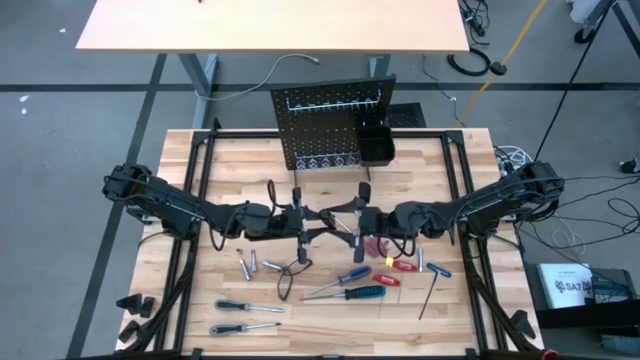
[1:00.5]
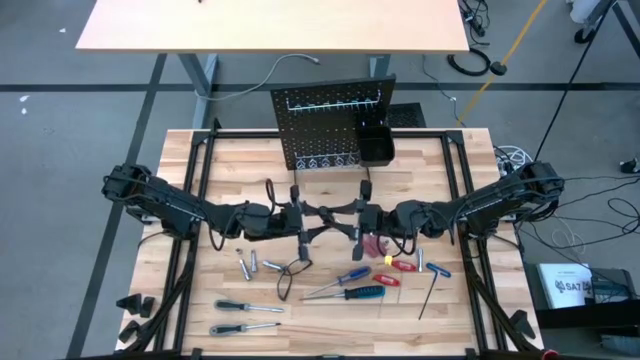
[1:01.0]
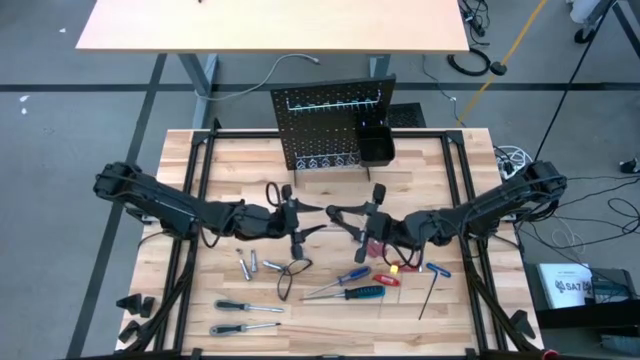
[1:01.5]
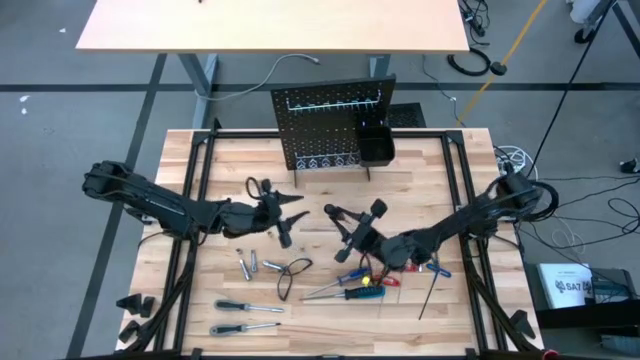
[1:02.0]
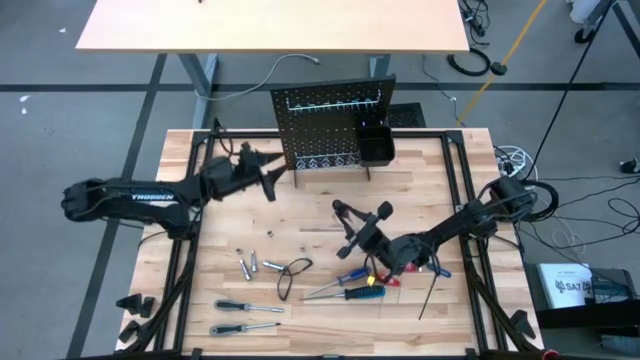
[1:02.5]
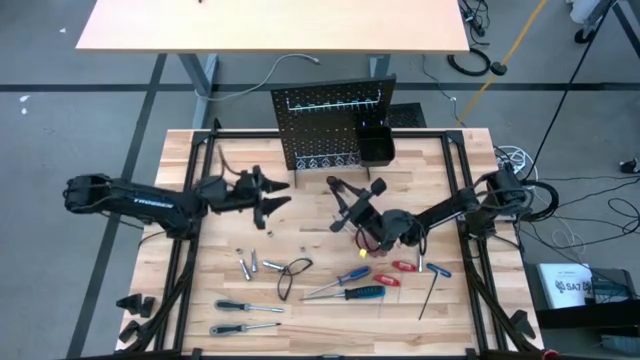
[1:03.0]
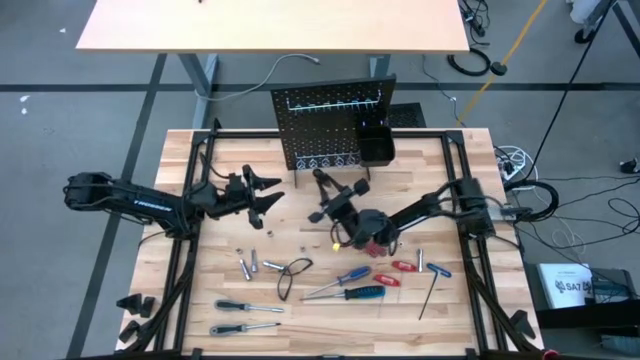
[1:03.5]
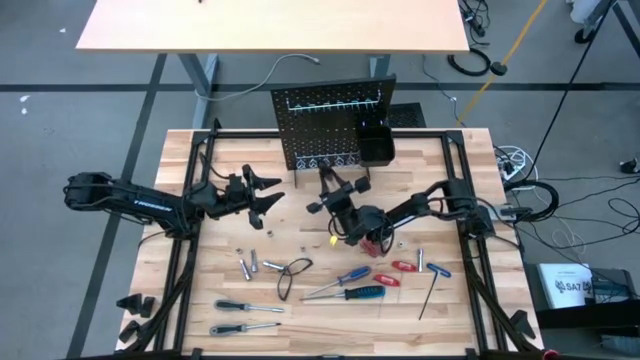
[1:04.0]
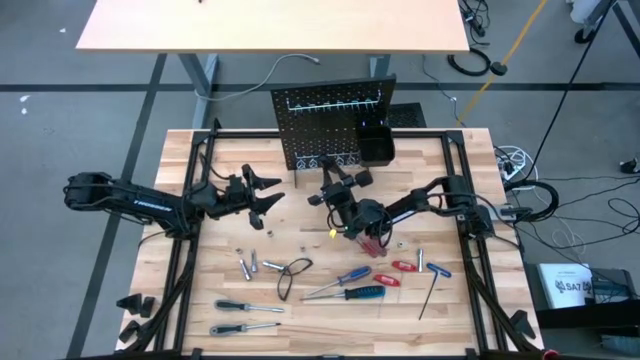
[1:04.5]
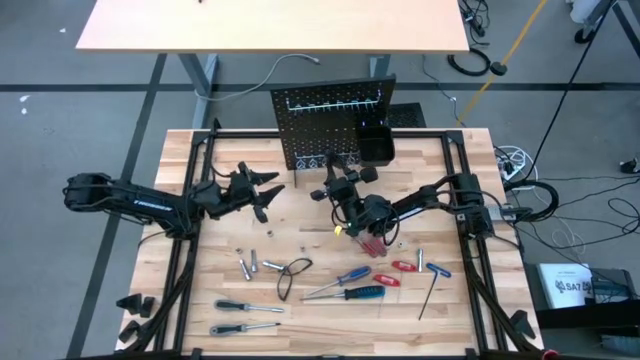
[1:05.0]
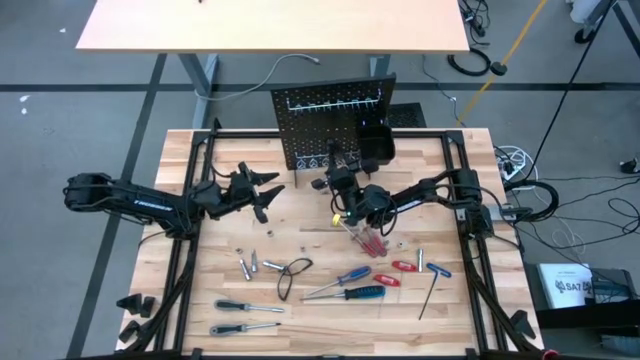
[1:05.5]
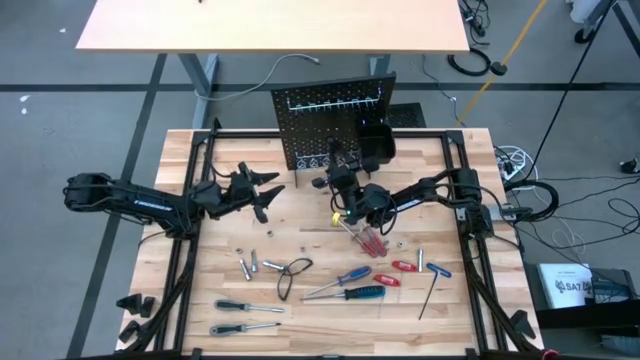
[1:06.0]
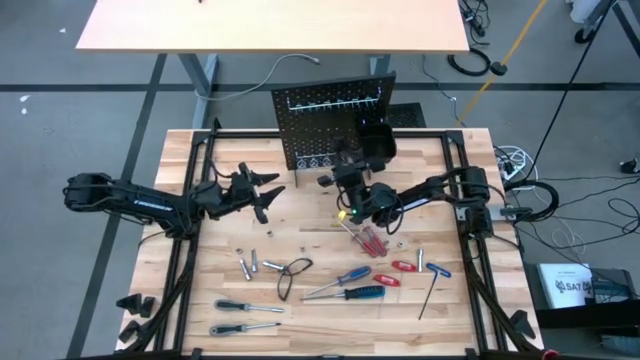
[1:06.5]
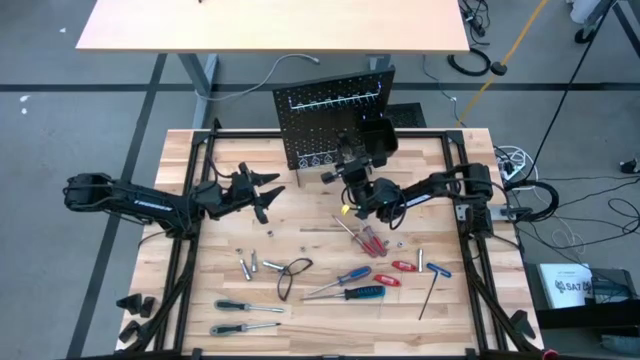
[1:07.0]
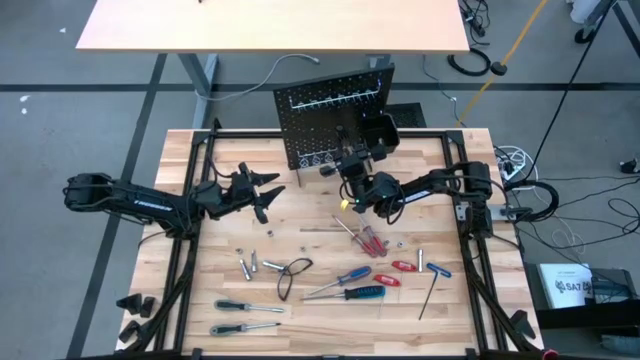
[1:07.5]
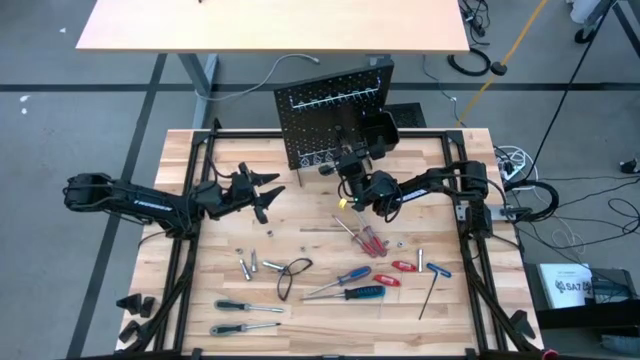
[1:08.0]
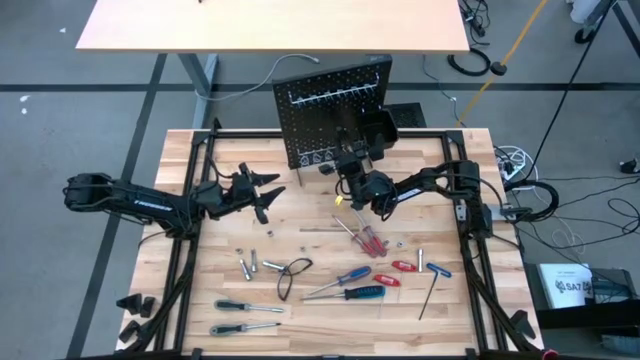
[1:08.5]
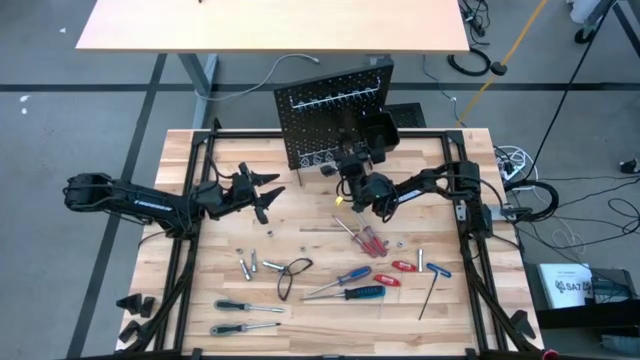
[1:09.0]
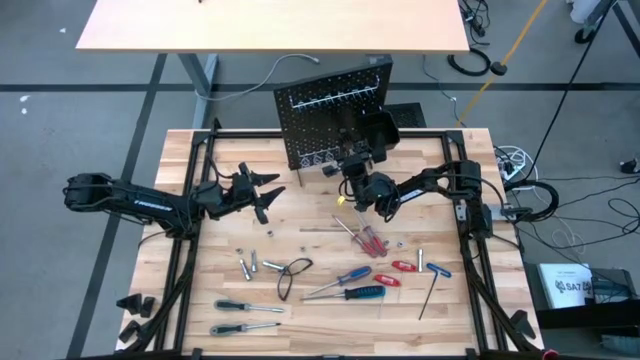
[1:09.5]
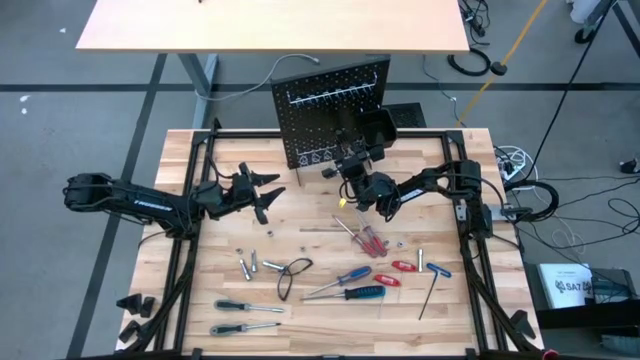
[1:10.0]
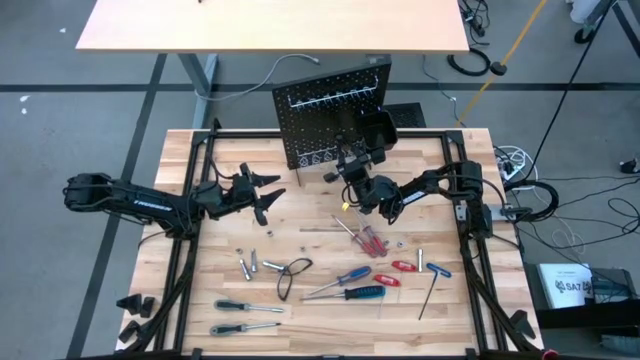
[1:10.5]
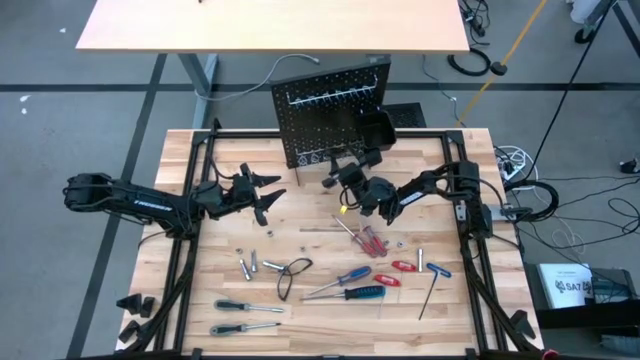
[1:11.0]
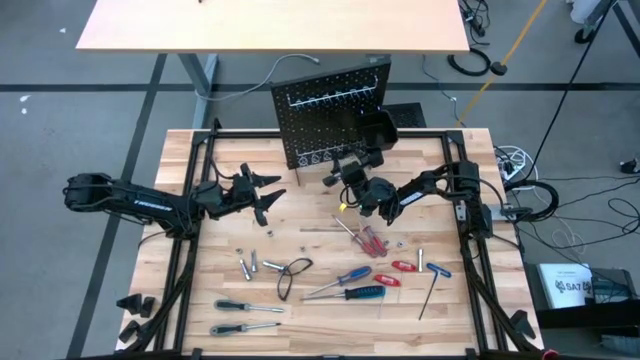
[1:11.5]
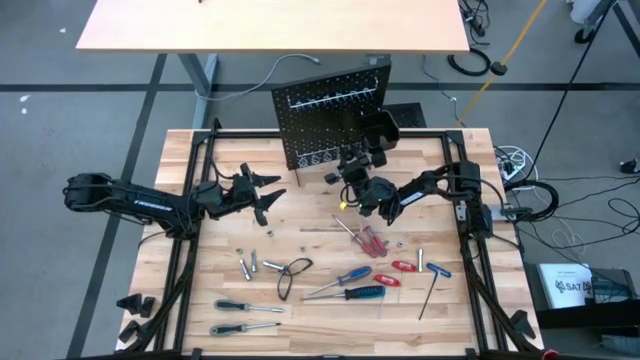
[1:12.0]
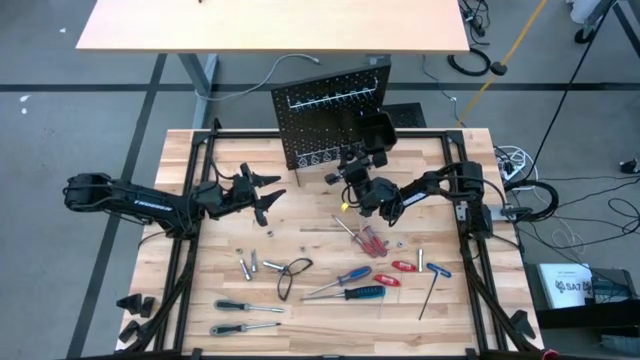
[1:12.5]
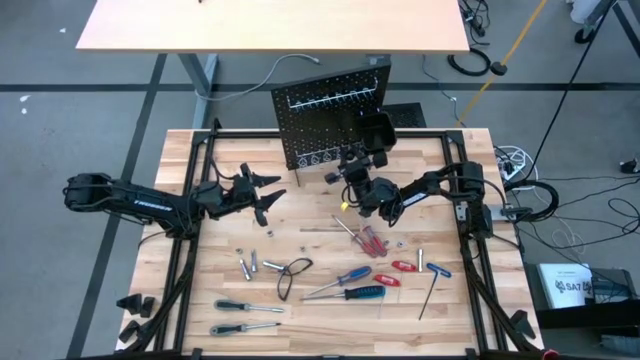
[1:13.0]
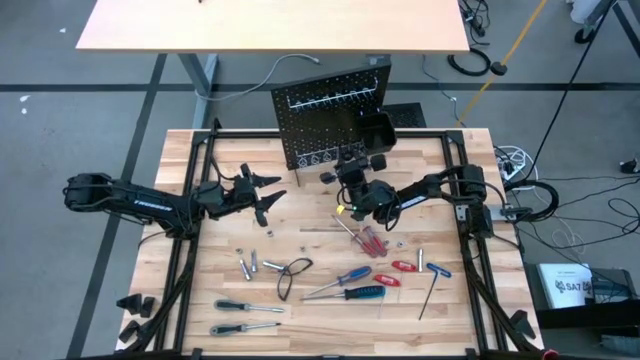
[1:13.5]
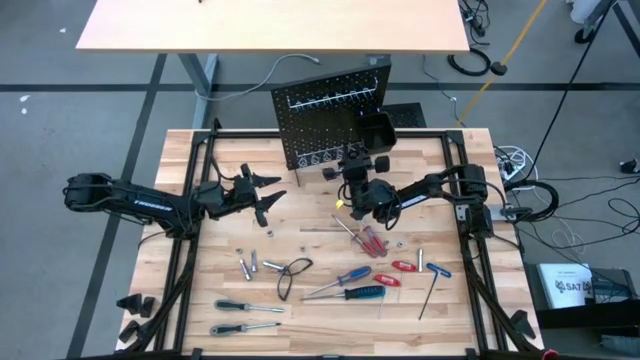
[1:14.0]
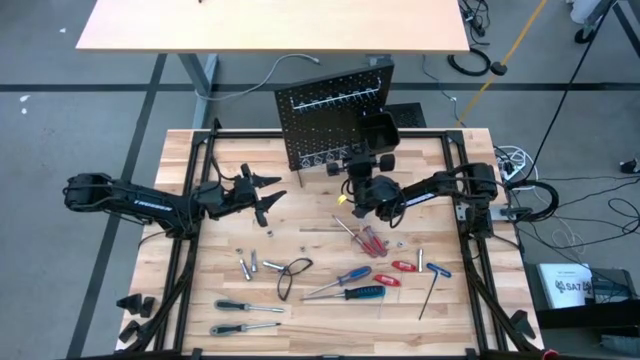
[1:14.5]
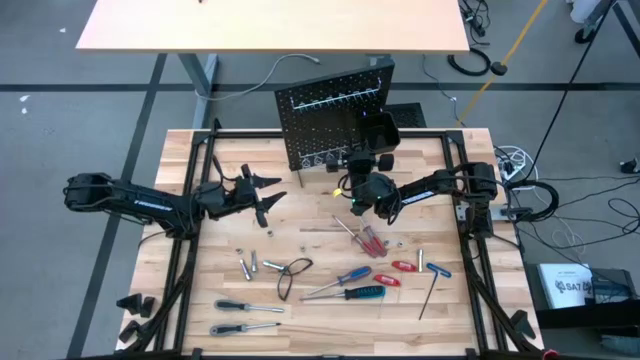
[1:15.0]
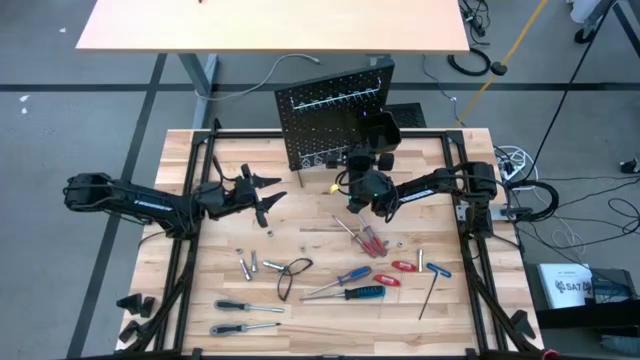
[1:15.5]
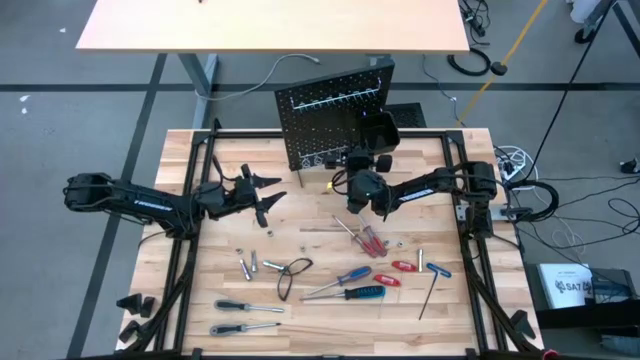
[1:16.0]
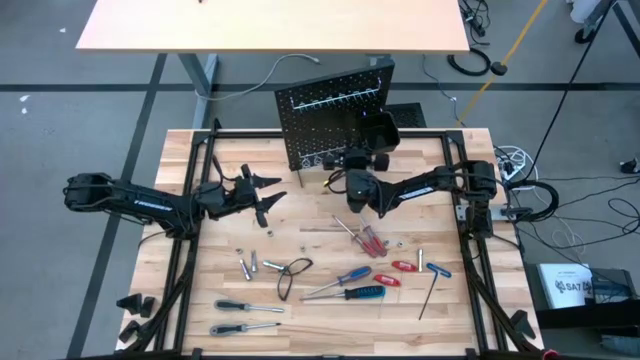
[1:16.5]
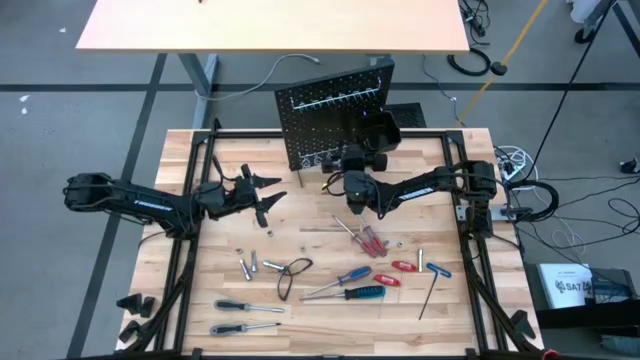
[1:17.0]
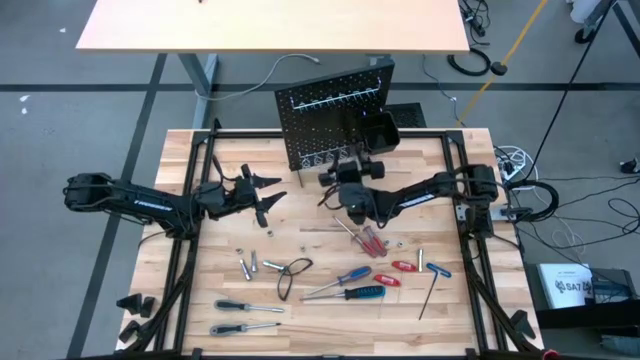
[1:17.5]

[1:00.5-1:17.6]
Task: Hang tools onto peg board
Hang the black screwdriver on the peg board

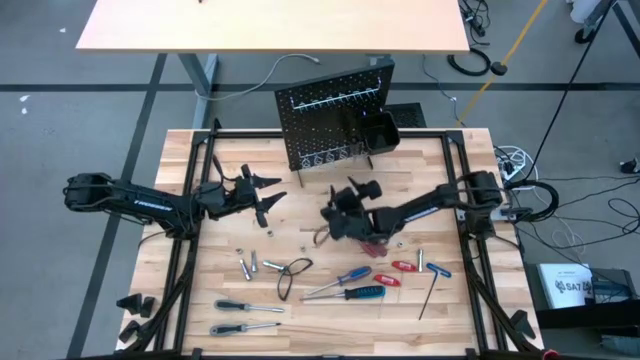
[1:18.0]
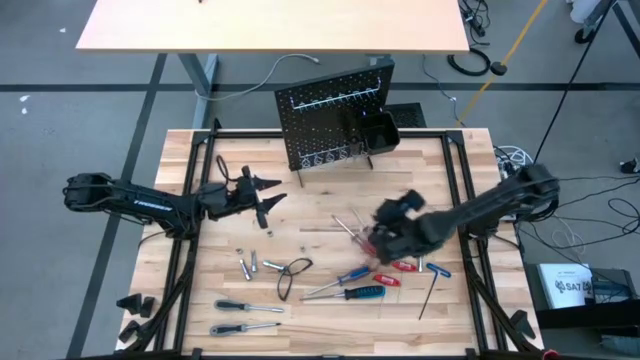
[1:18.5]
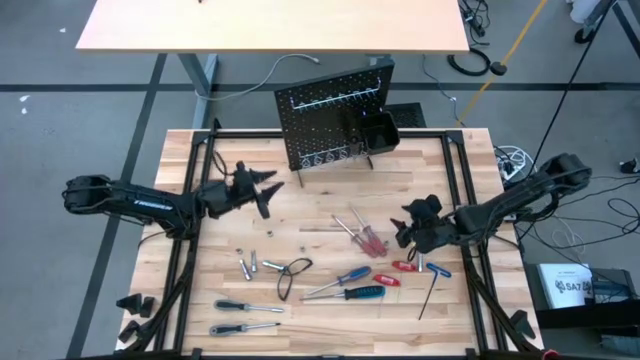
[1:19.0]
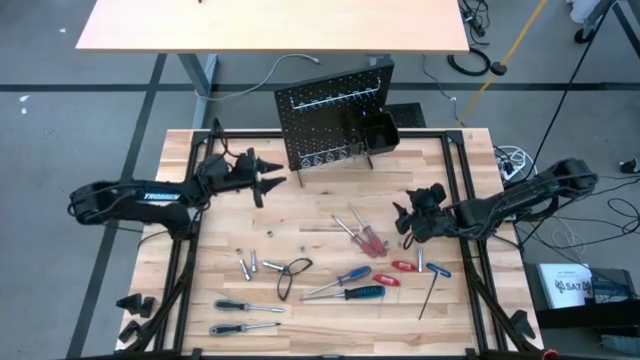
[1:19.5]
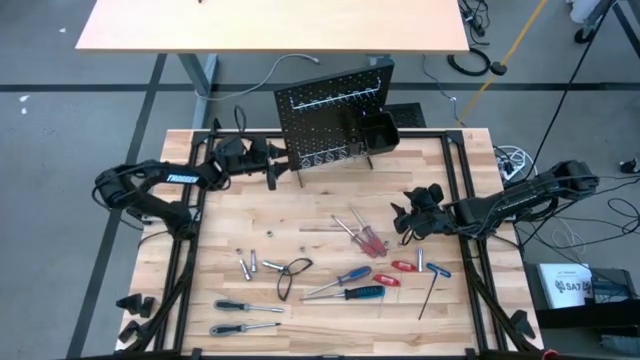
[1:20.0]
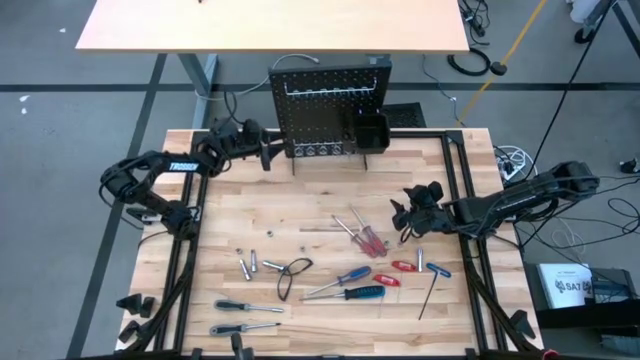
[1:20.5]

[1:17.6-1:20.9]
Adjust the peg board

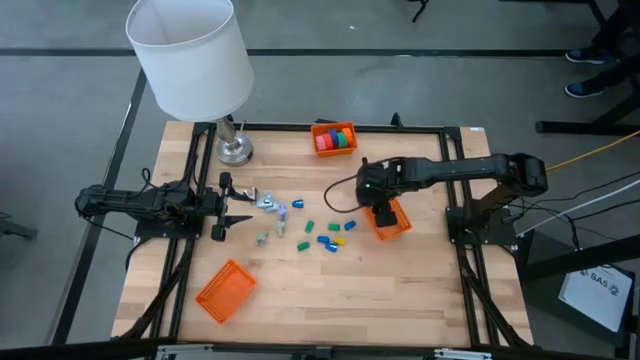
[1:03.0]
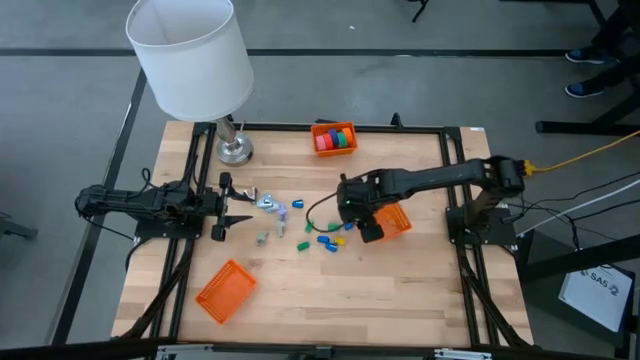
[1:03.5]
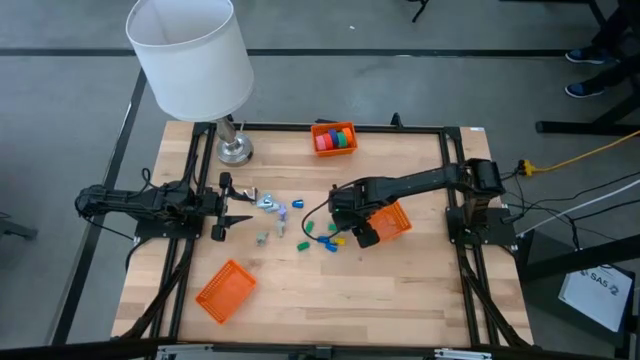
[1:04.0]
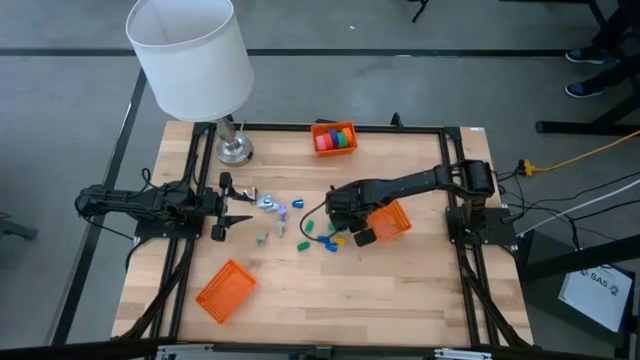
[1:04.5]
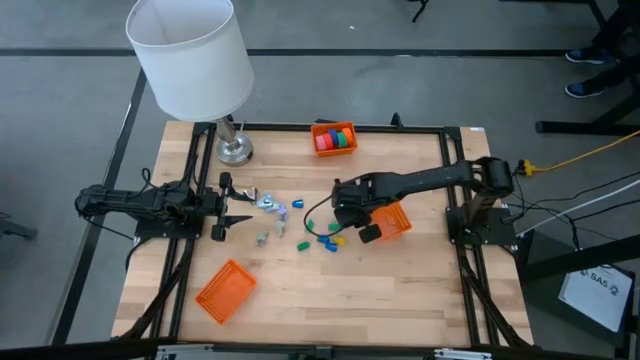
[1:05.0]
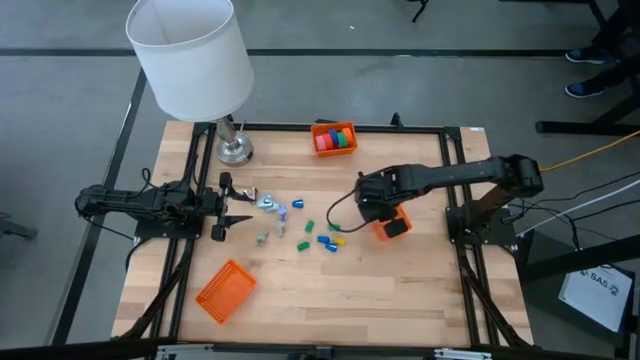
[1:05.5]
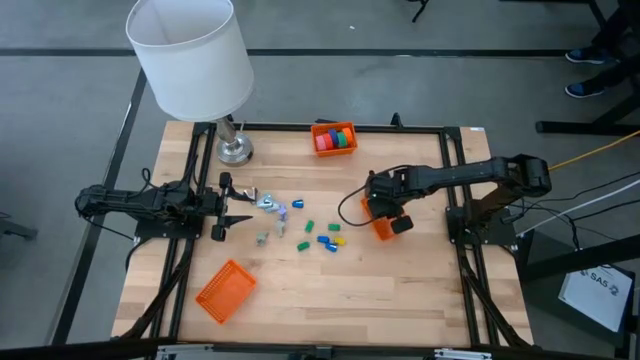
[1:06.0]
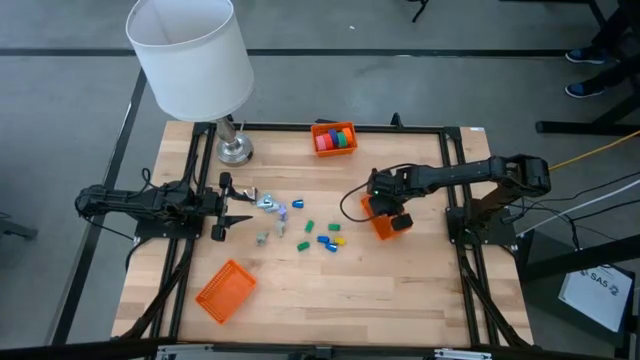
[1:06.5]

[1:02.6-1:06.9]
Task: Pick and place Stapler, Stapler remover, tape
Put the blue stapler into the middle orange bin
